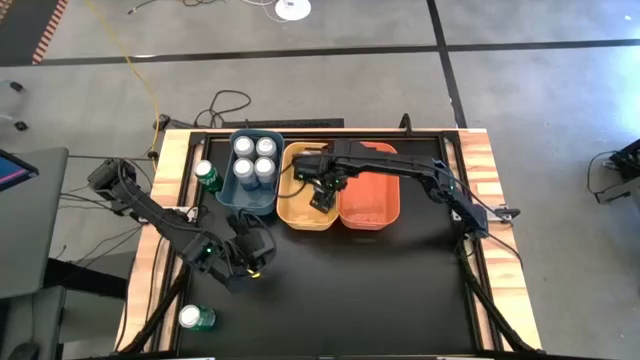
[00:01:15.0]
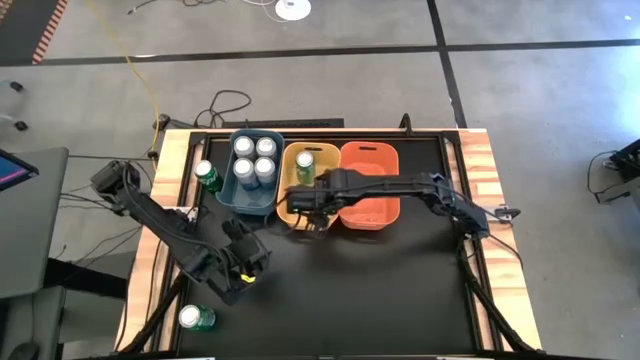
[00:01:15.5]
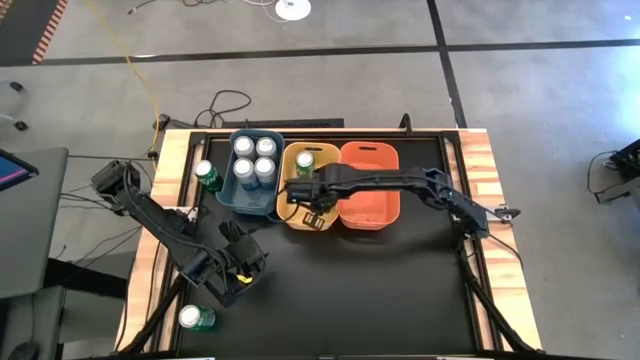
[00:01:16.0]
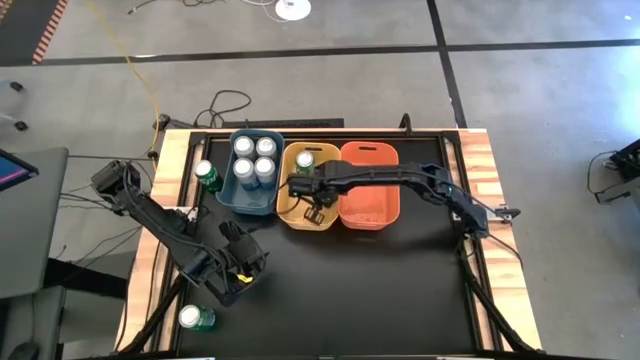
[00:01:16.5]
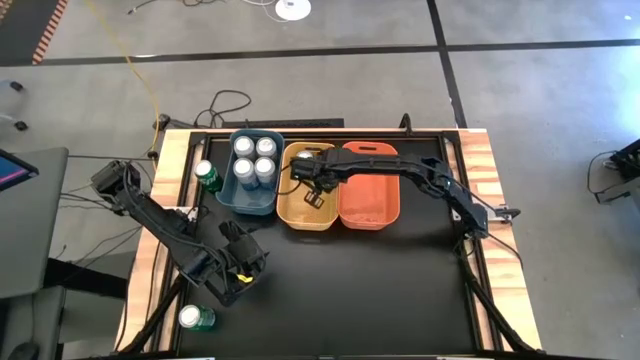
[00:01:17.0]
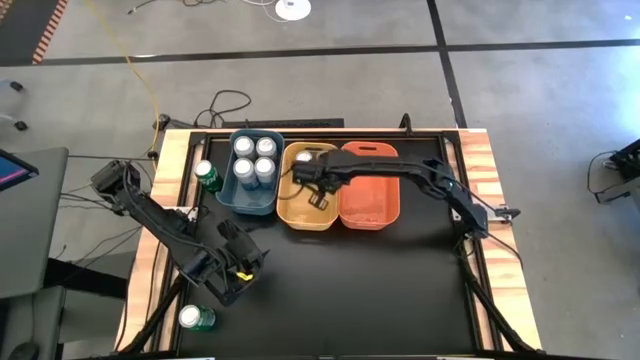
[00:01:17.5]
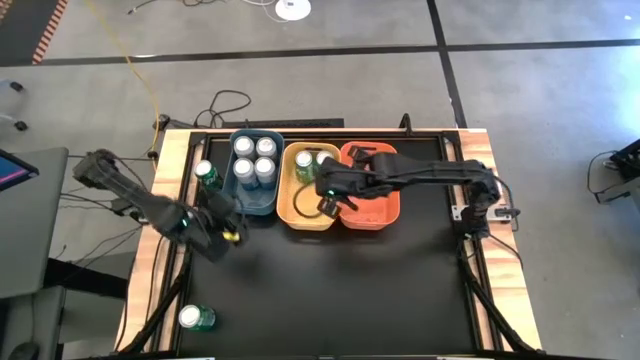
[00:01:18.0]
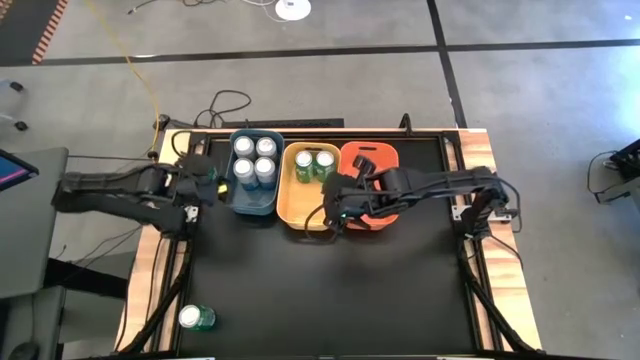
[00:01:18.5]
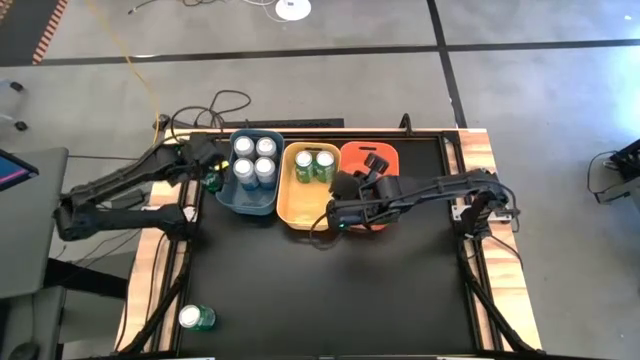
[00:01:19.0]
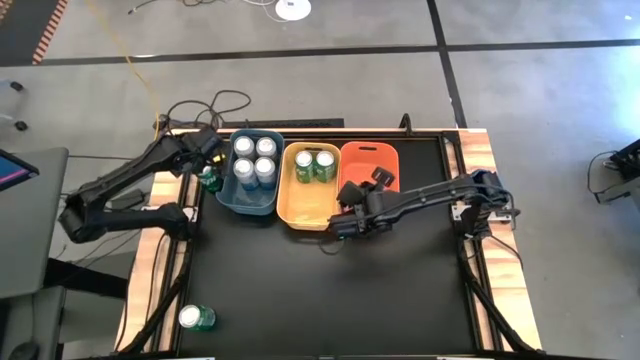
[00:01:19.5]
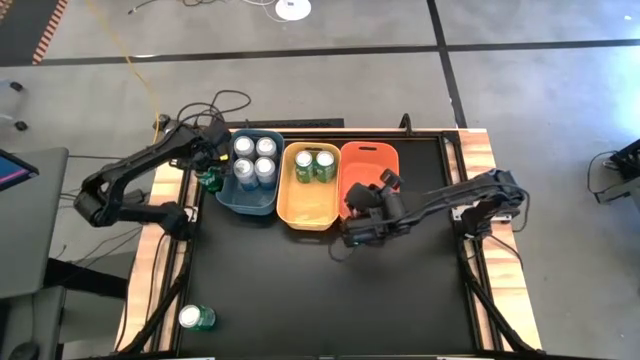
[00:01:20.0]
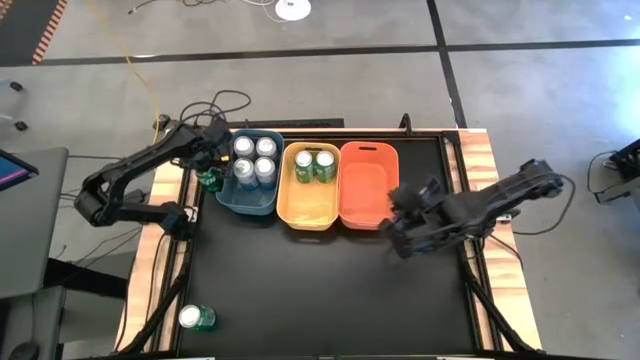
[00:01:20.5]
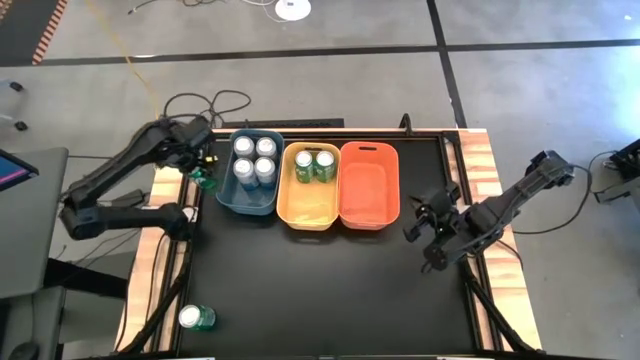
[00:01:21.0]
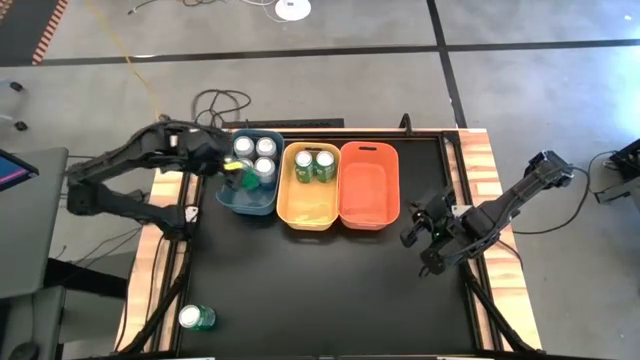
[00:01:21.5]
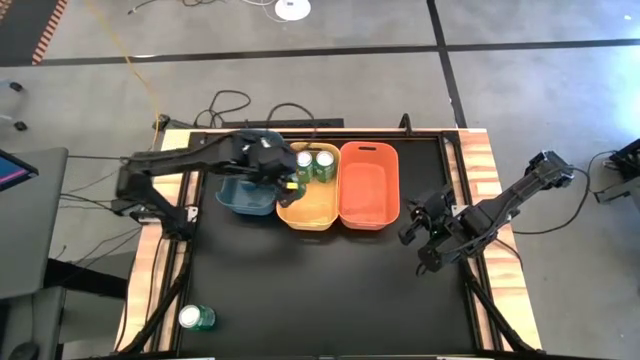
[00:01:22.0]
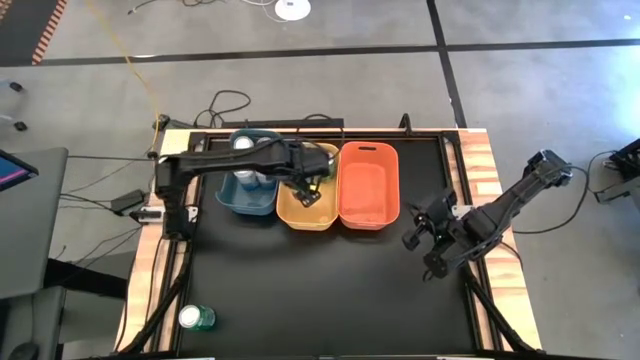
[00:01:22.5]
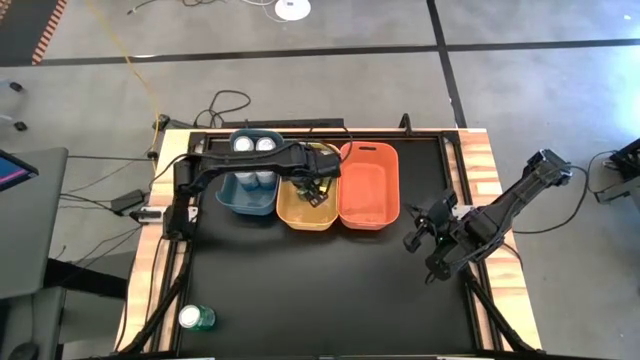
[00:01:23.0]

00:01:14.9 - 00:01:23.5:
Task: Sort soda cans
Put the green soda can into the yellow bin

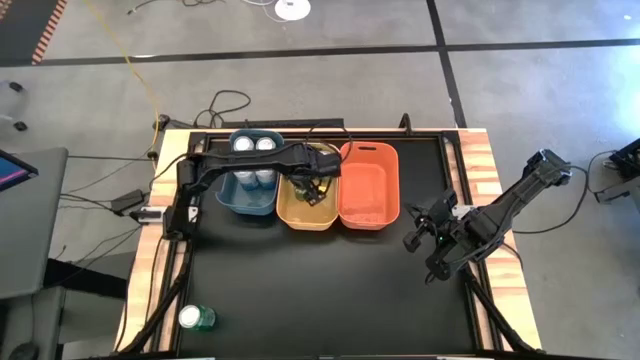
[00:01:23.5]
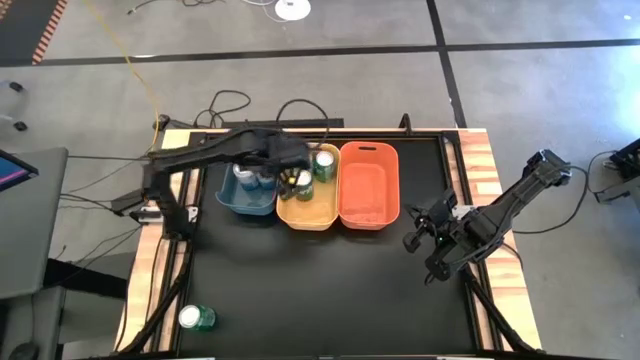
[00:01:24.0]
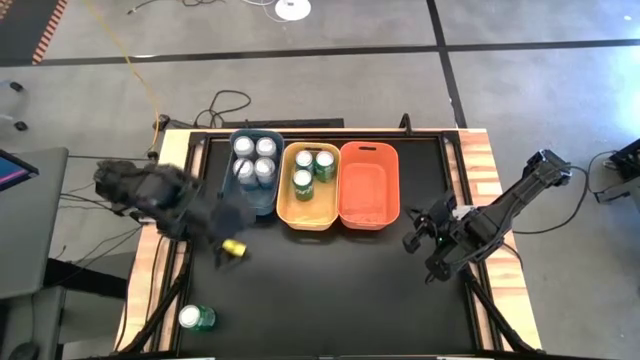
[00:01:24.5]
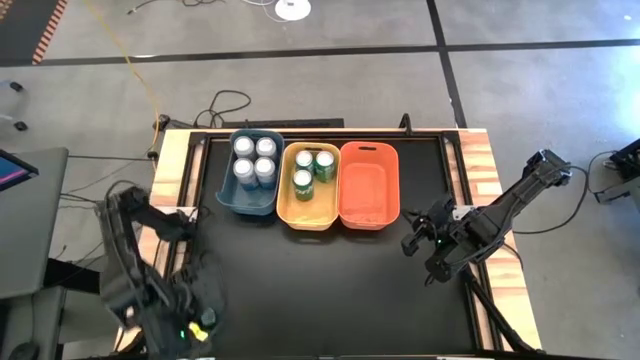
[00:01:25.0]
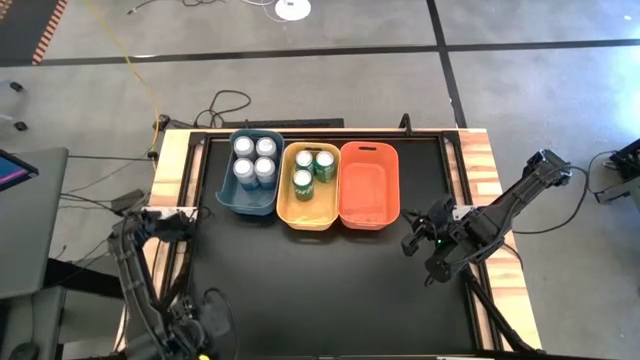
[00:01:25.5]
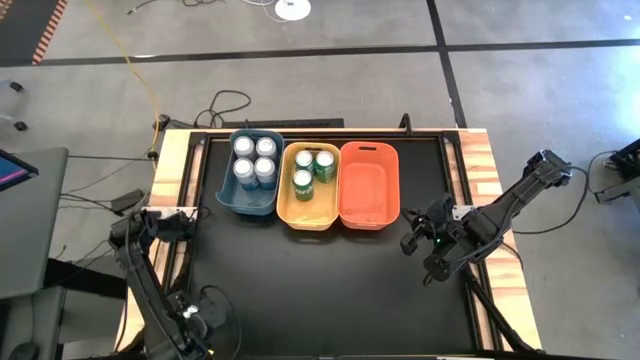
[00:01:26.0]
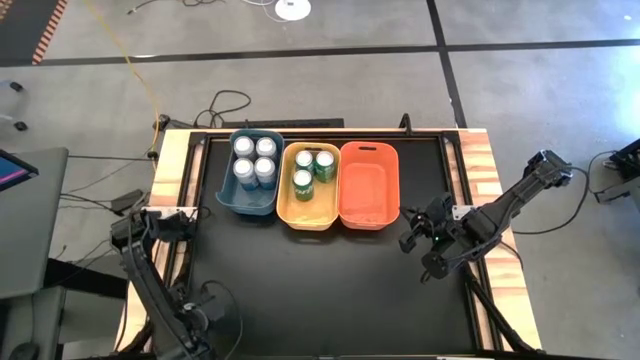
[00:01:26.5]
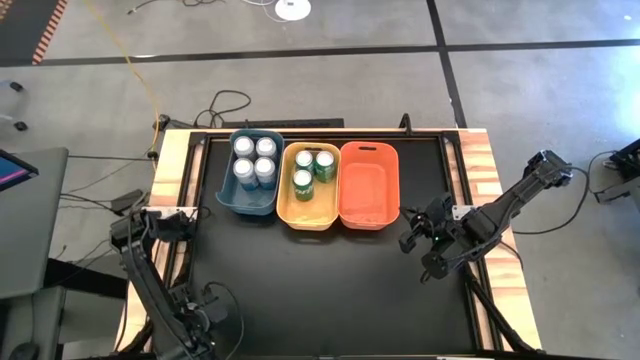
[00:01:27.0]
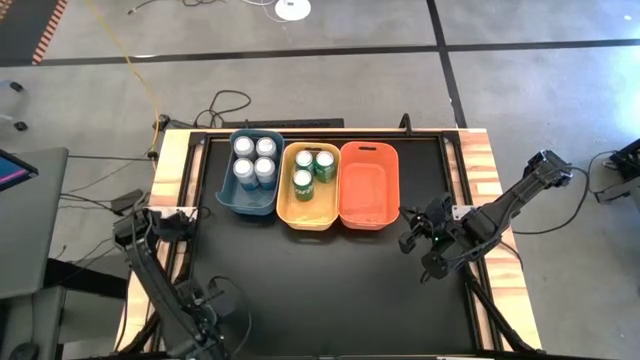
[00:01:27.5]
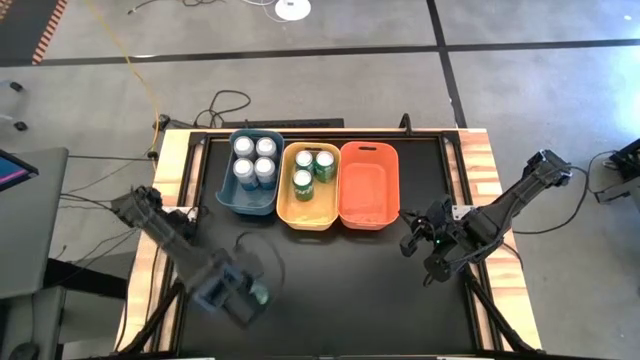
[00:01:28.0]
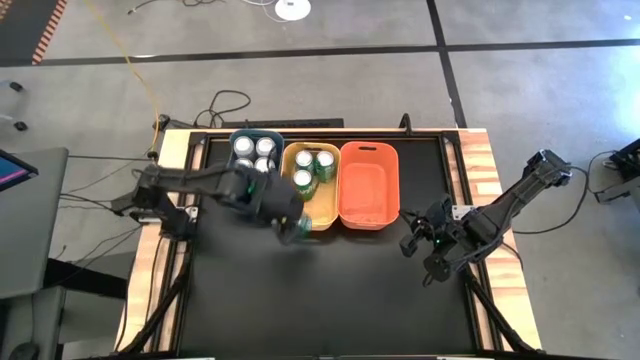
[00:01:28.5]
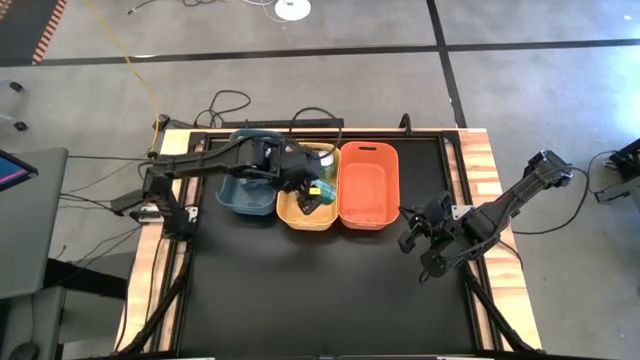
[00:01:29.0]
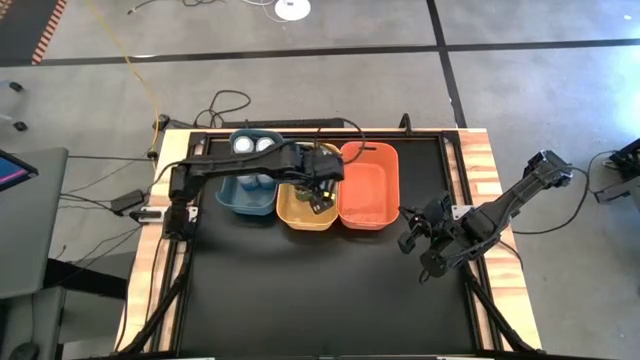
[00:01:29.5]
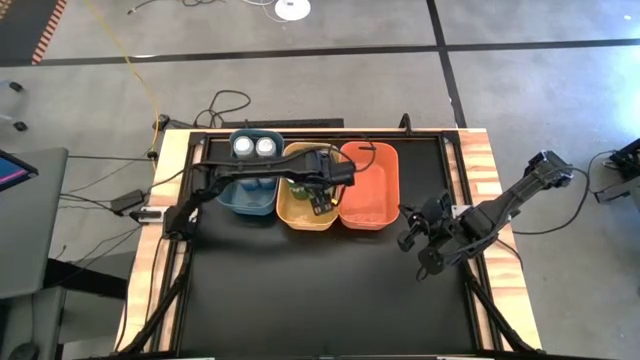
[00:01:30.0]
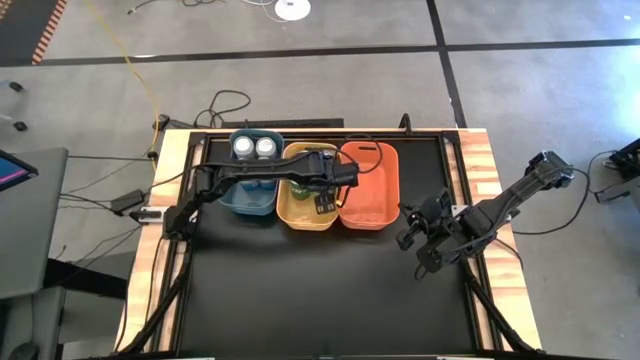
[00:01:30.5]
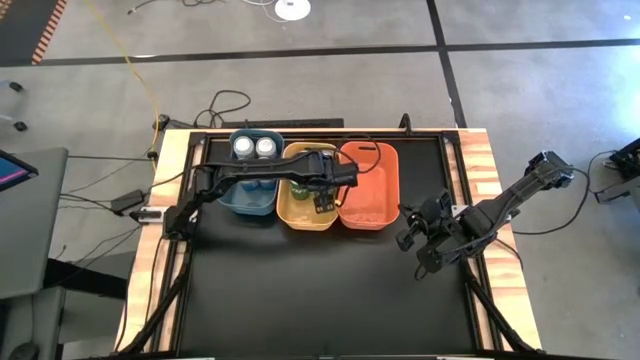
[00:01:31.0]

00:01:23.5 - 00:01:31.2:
Put the green soda can into the yellow bin

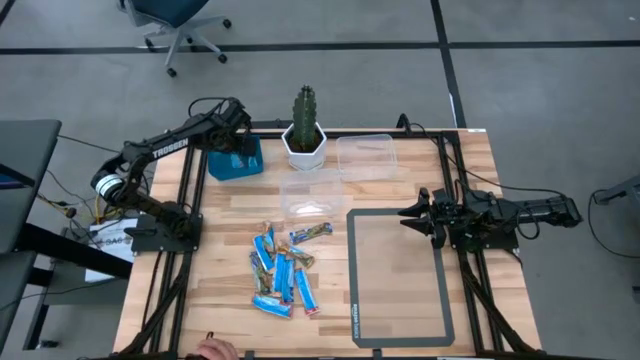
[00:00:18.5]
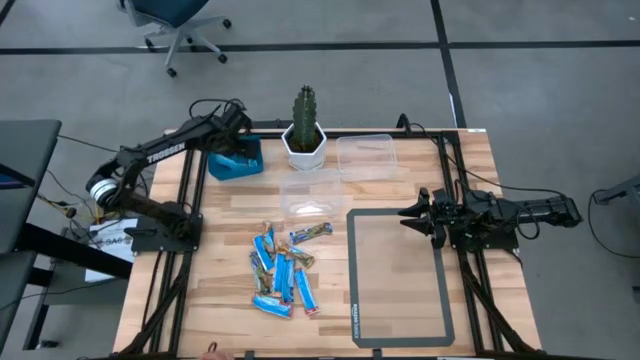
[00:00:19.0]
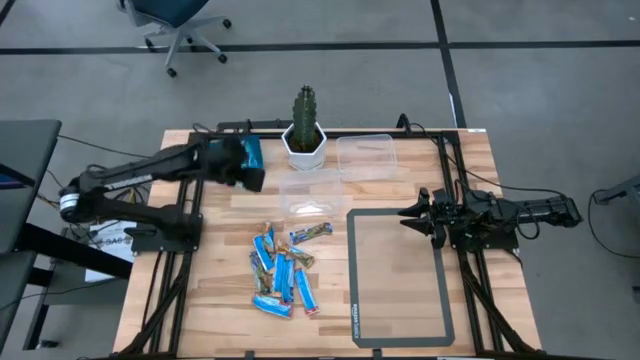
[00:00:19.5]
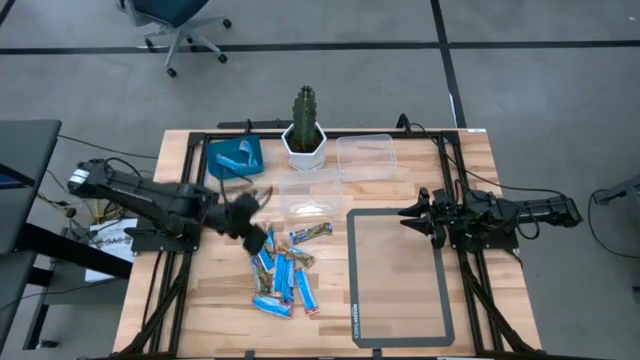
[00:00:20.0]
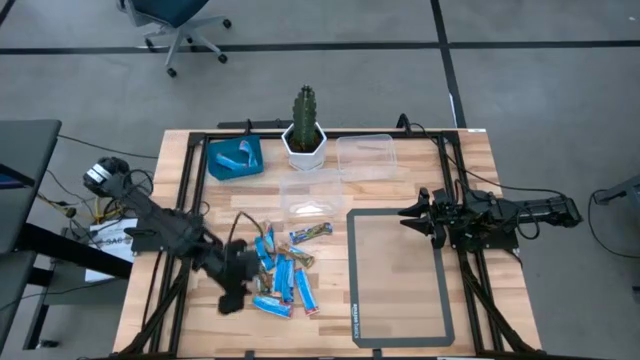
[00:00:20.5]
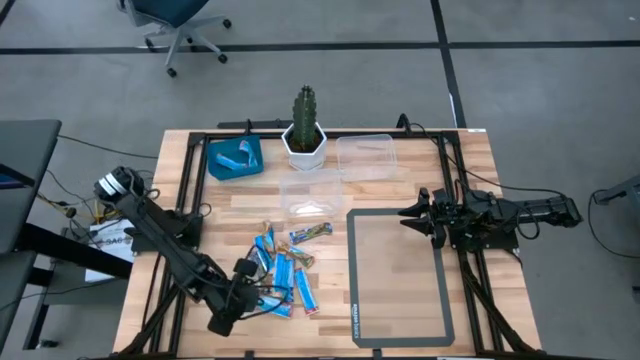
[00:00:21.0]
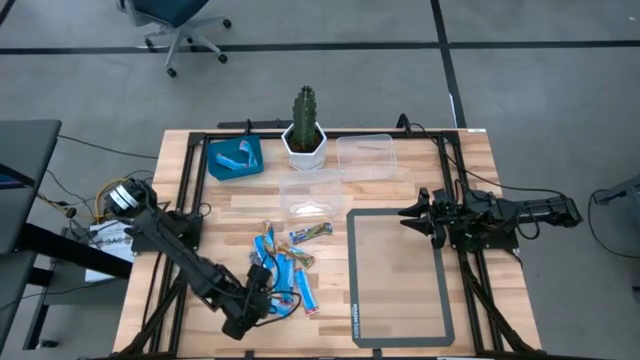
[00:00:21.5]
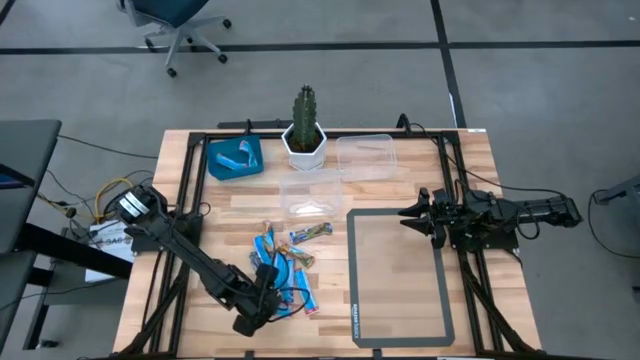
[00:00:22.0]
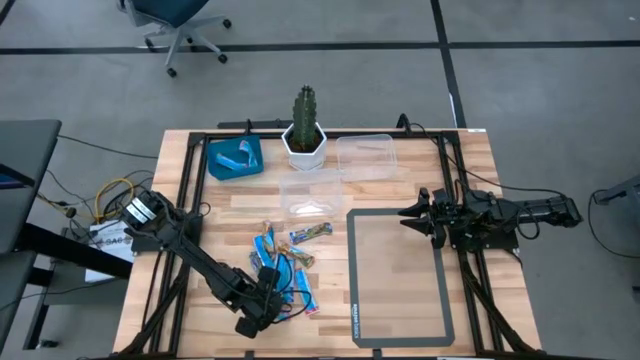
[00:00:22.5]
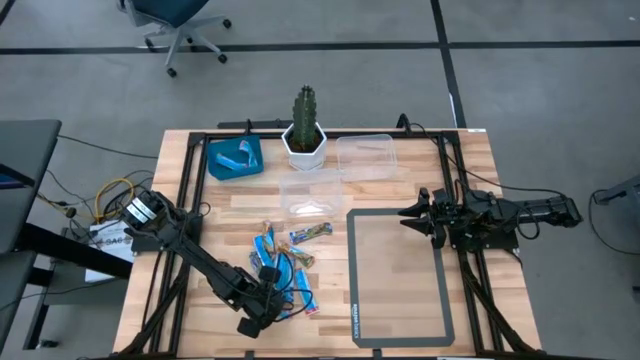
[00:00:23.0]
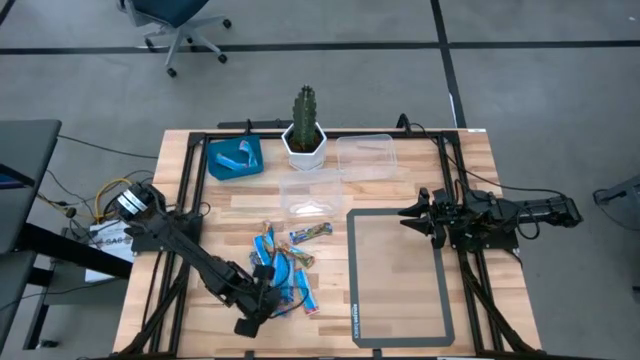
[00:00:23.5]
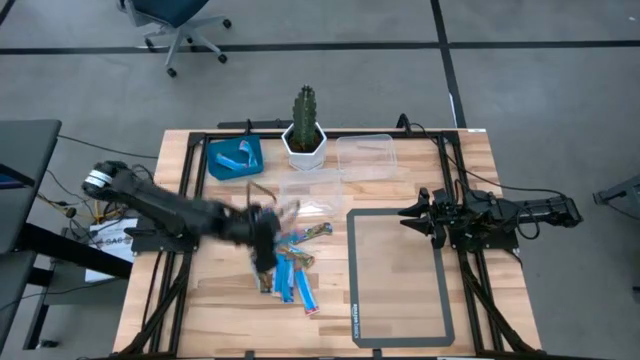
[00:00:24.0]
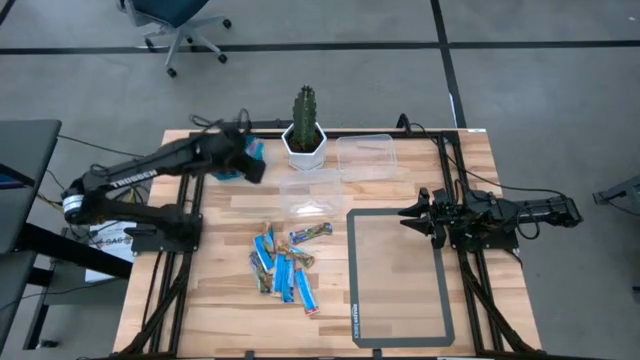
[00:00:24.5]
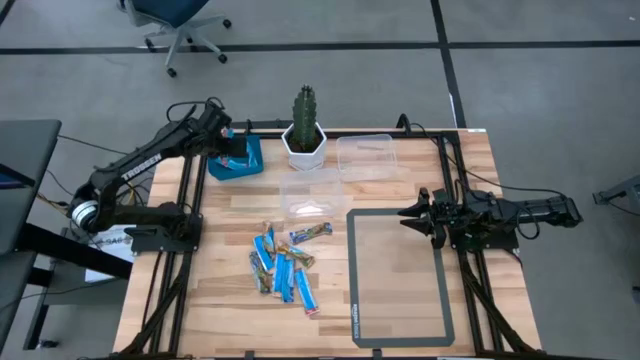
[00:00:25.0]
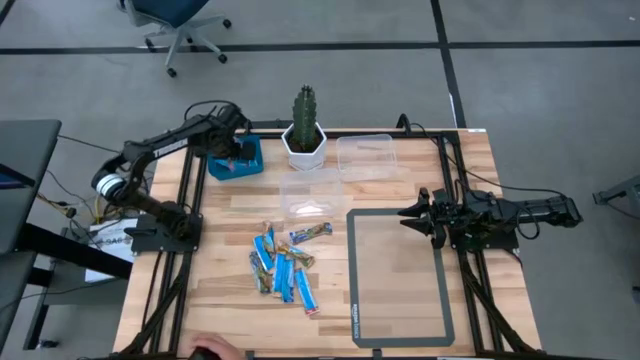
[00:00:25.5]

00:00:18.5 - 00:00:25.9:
Task: Pick and place Granola Bars by type
Put the red granola bar into the blue bin
